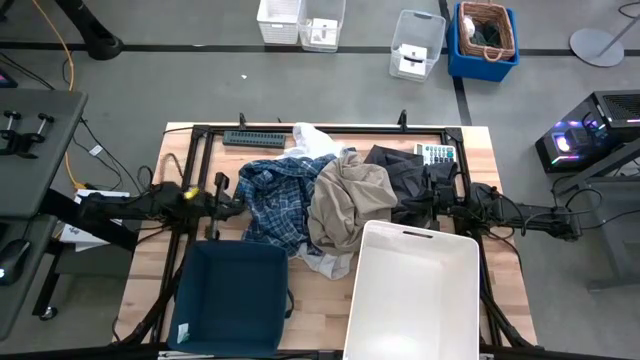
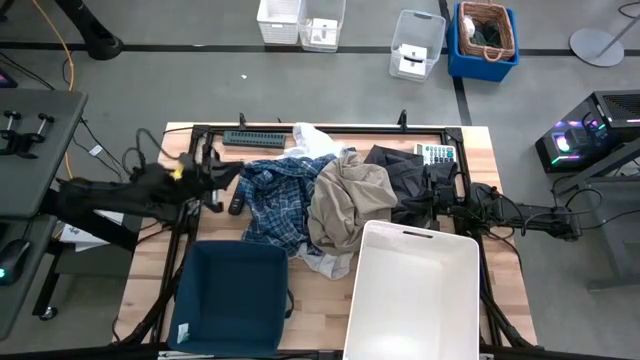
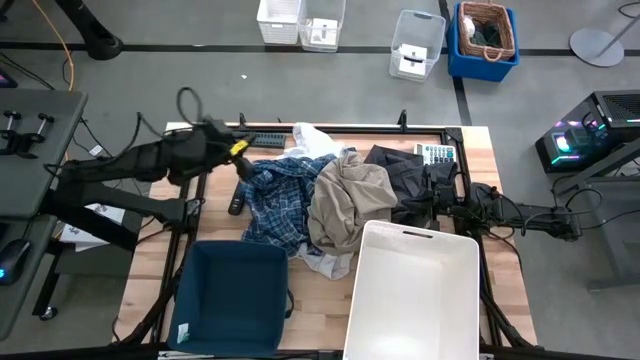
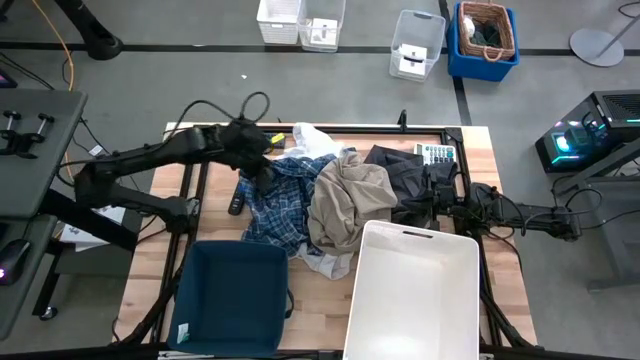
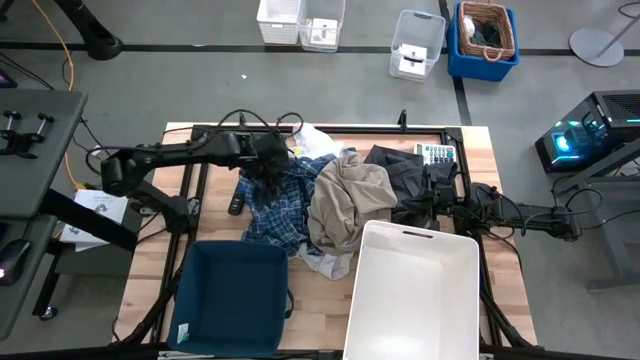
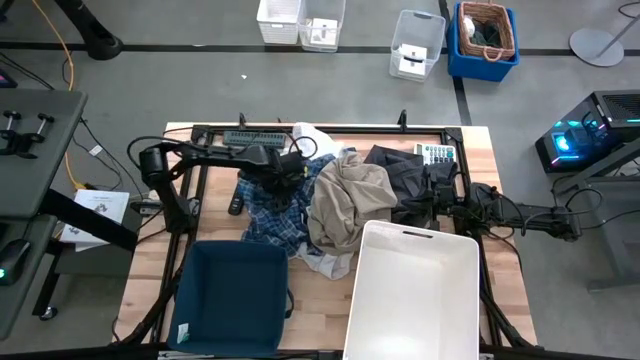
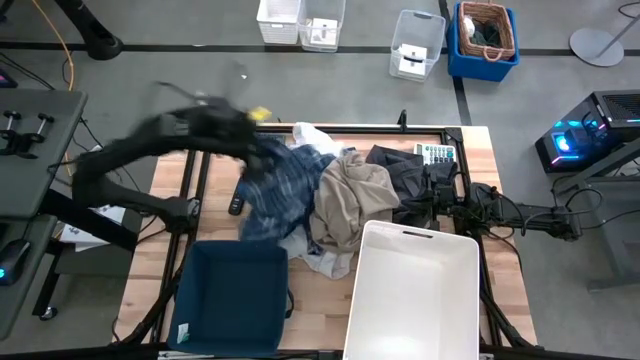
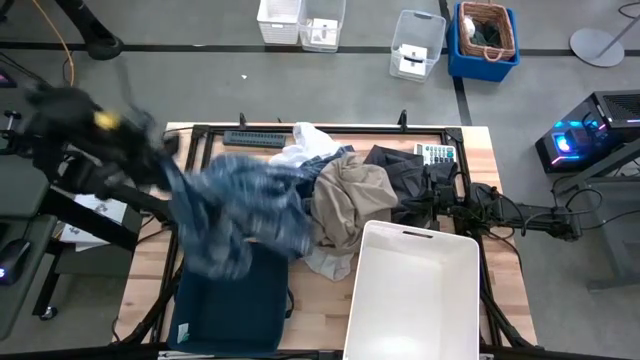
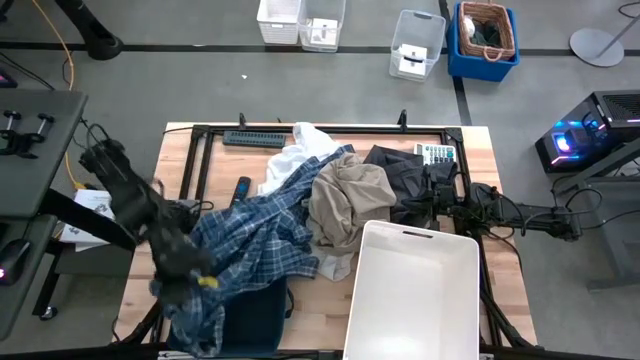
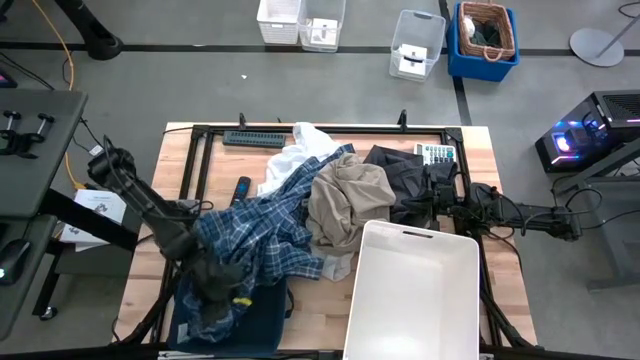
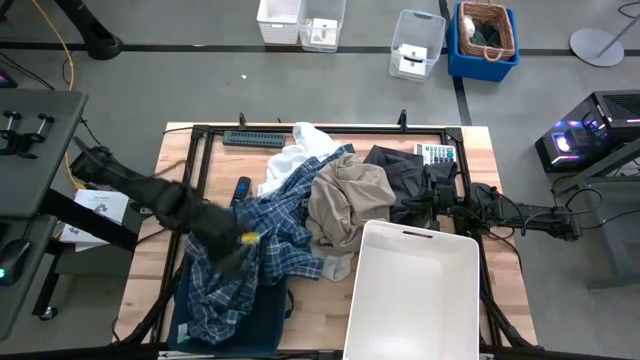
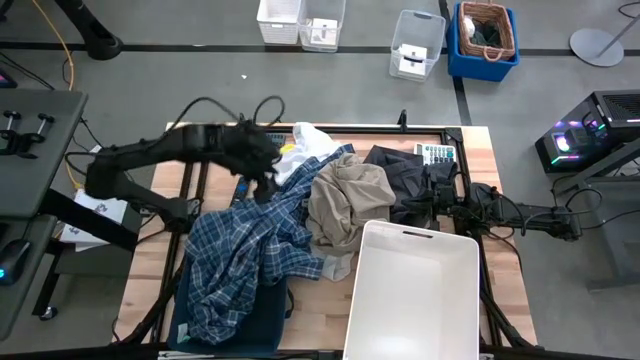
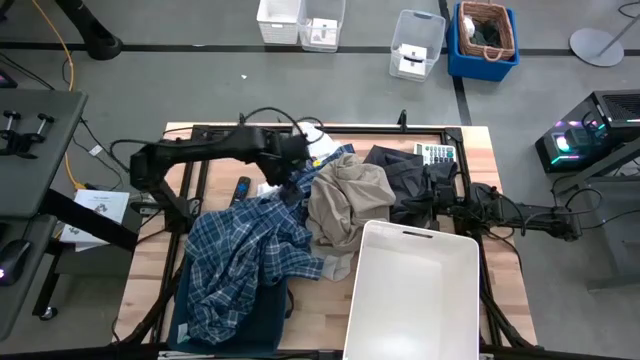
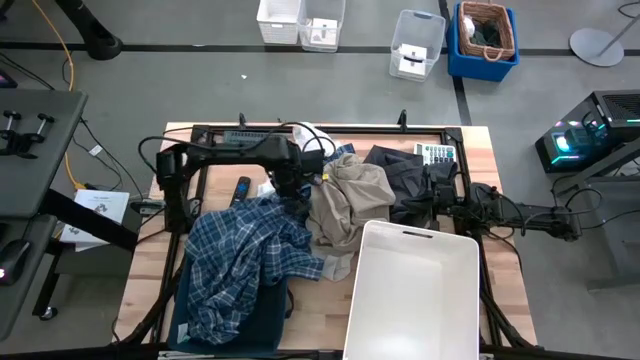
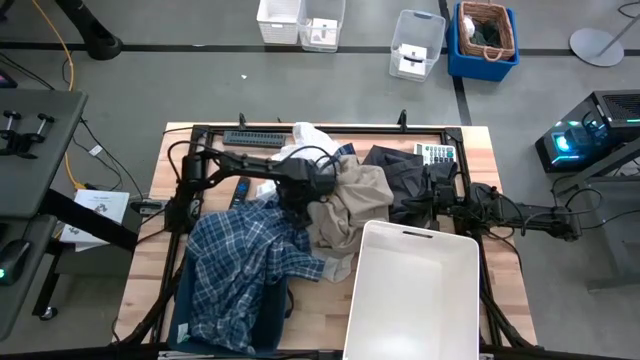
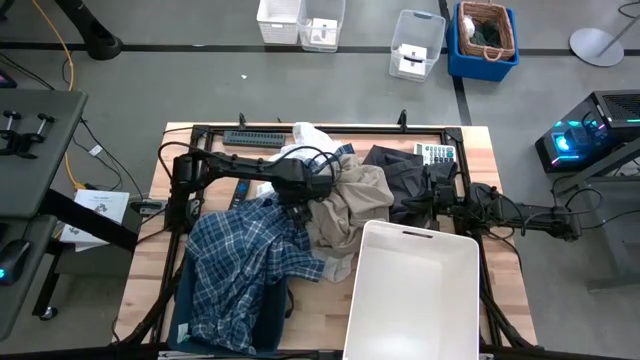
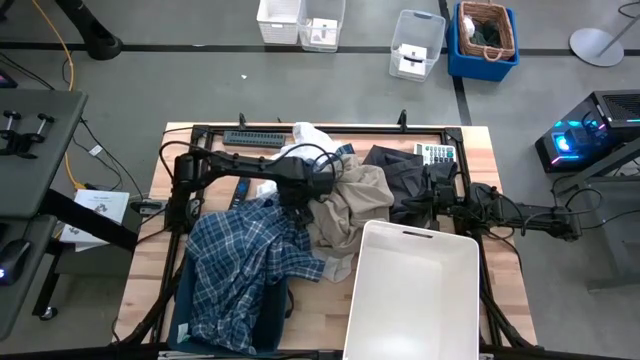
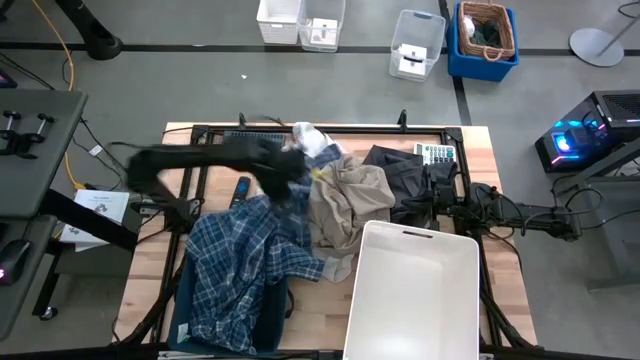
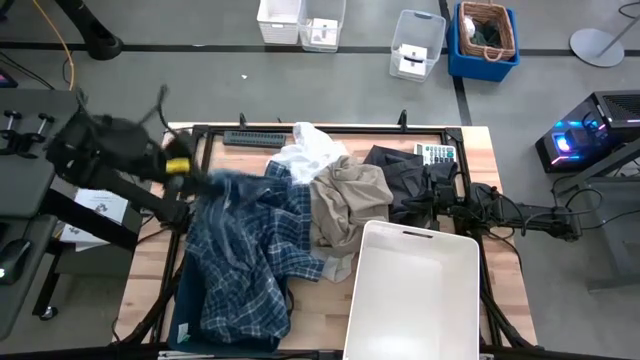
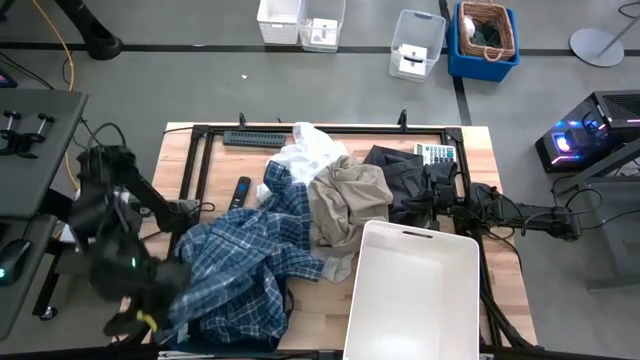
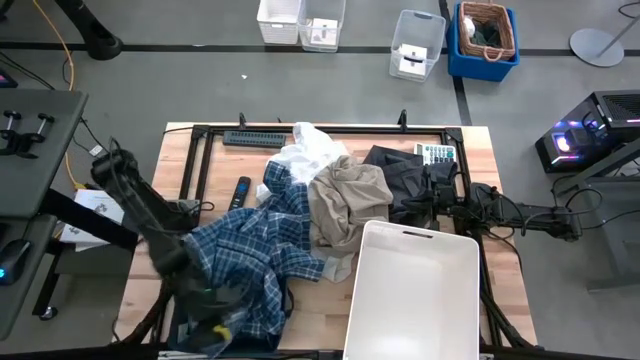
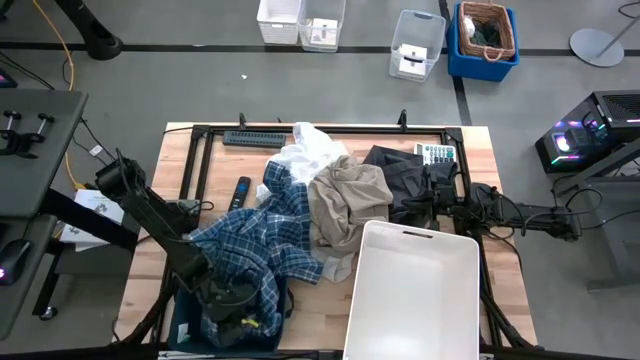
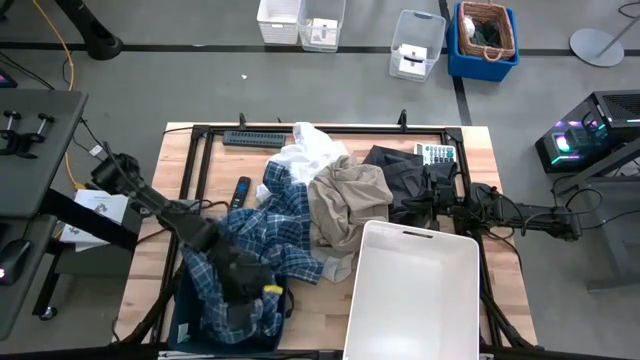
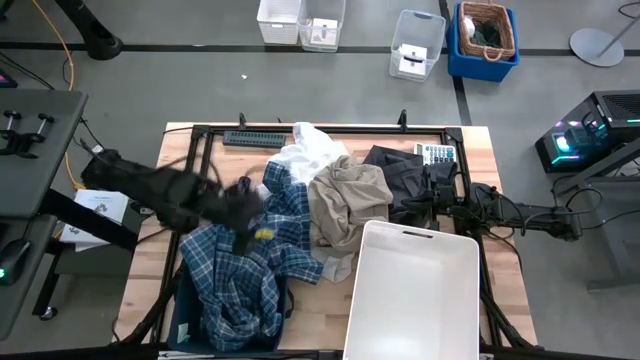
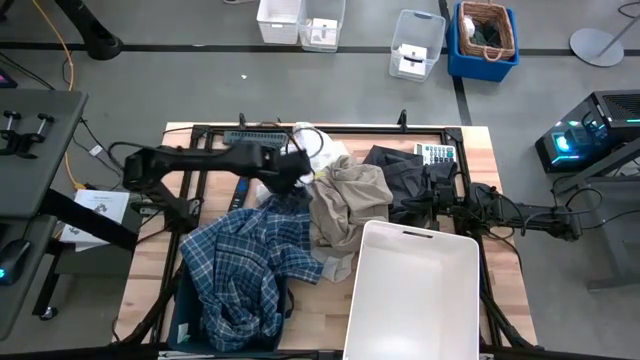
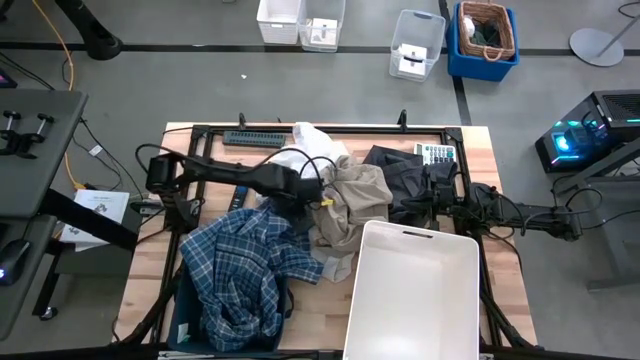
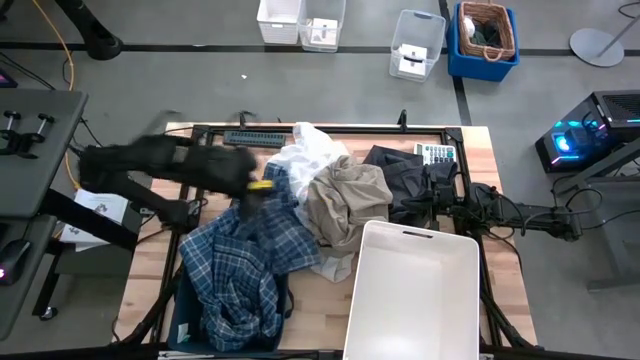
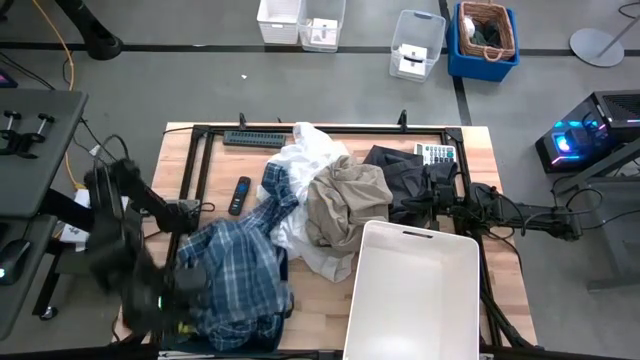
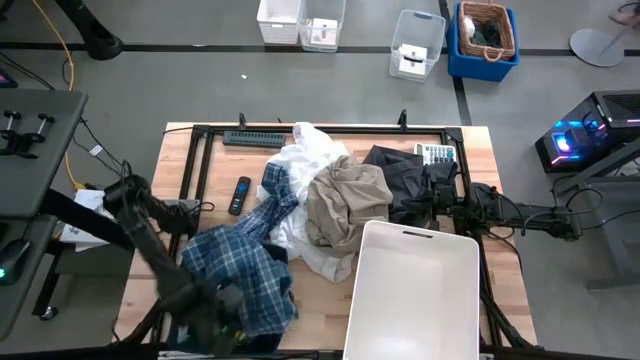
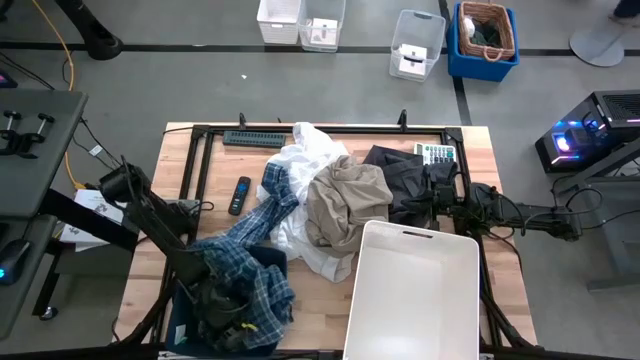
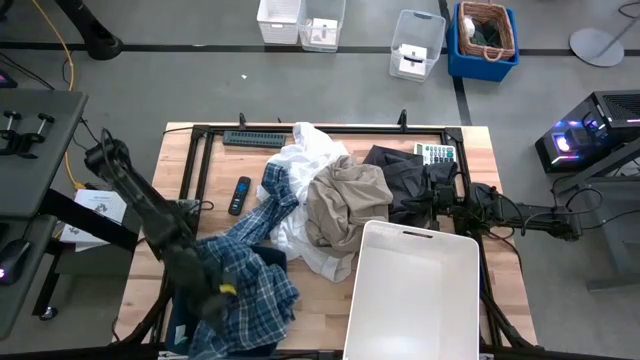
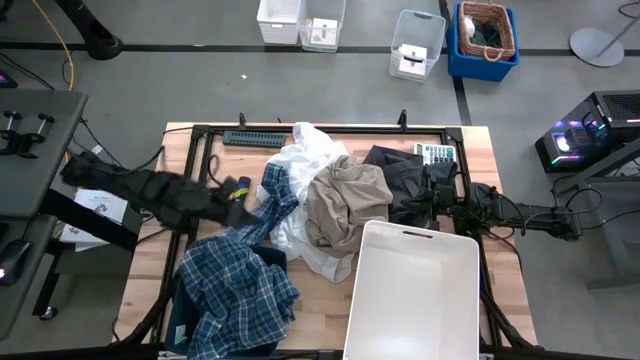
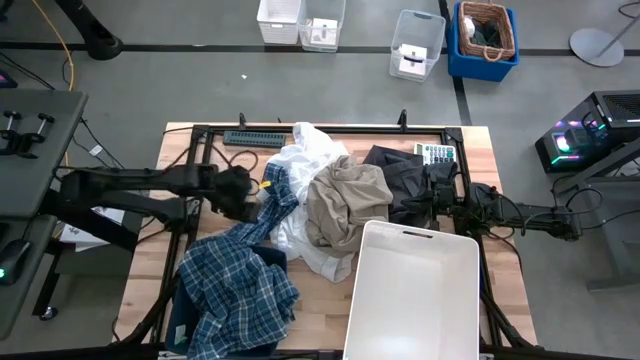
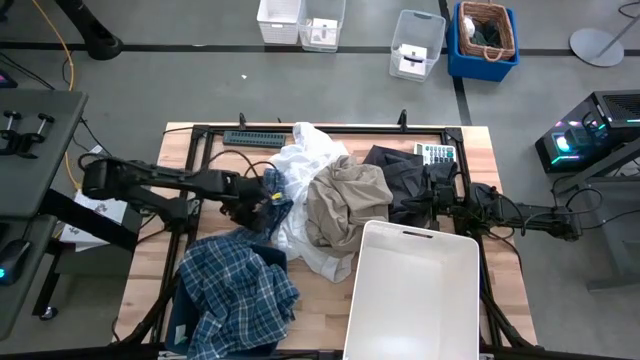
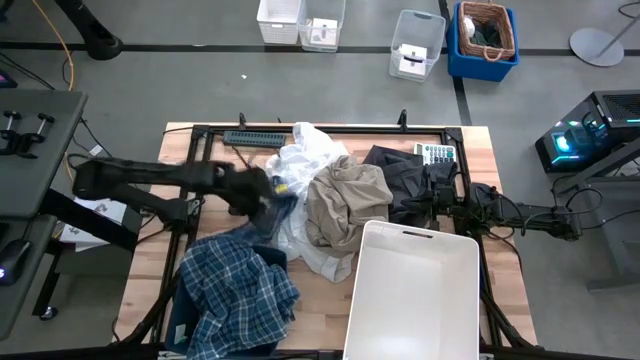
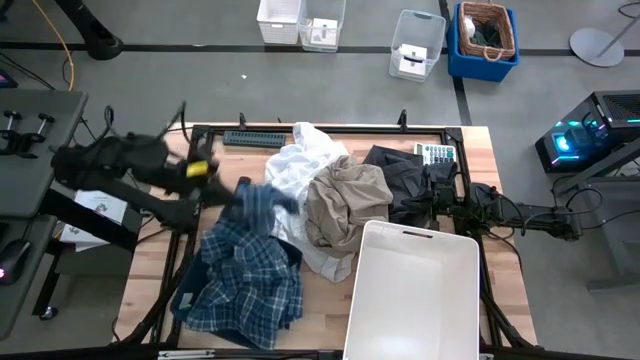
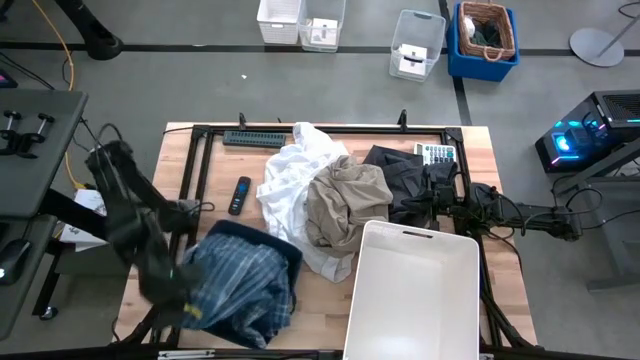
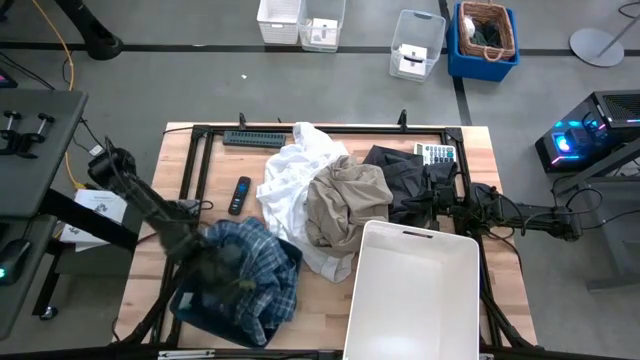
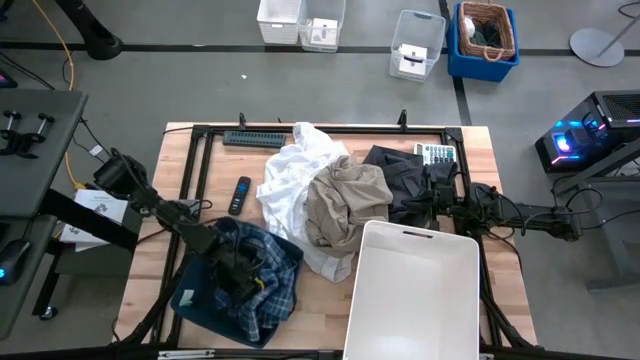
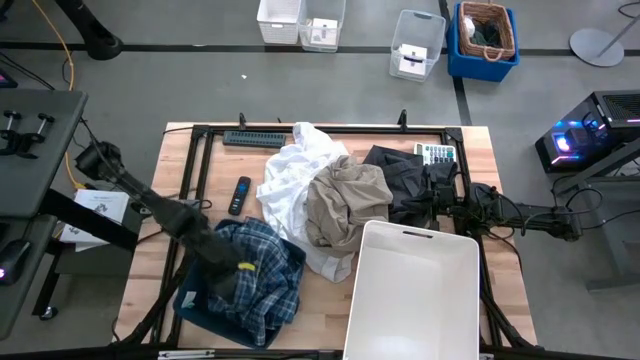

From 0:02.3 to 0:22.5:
Task: Sort clothes
Put the blue shirt into blue laundry organizer
